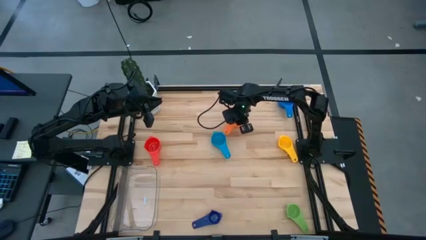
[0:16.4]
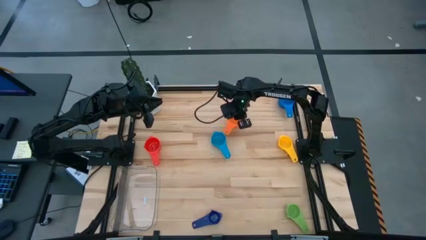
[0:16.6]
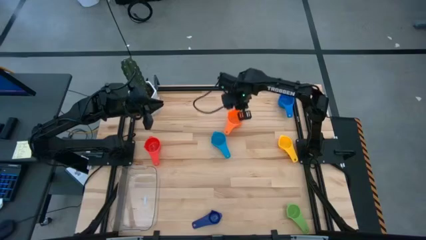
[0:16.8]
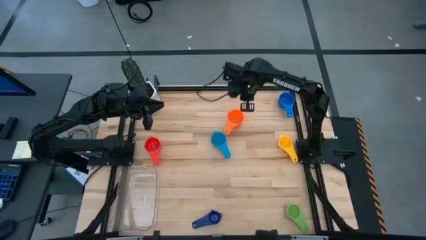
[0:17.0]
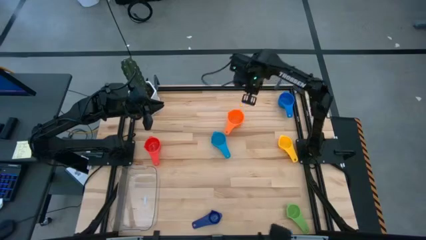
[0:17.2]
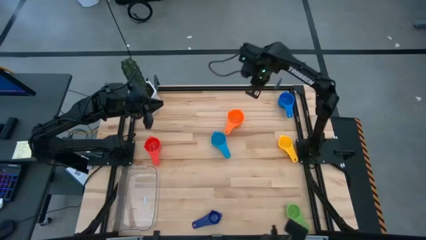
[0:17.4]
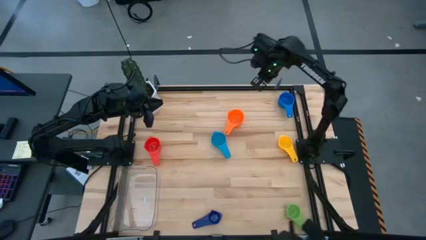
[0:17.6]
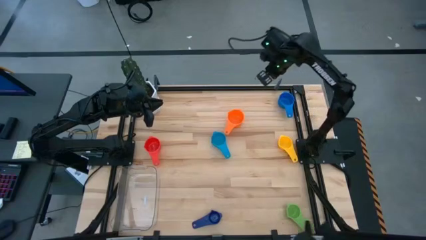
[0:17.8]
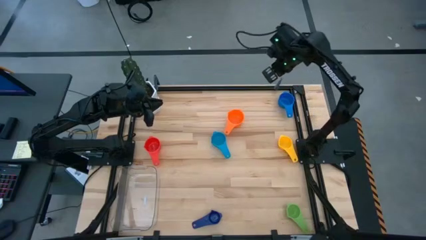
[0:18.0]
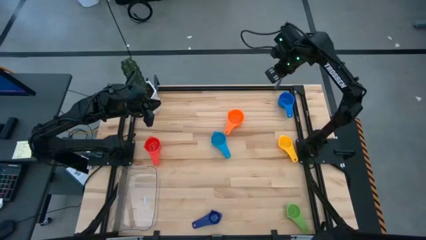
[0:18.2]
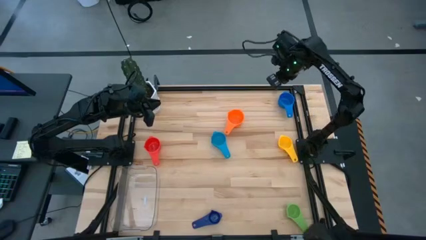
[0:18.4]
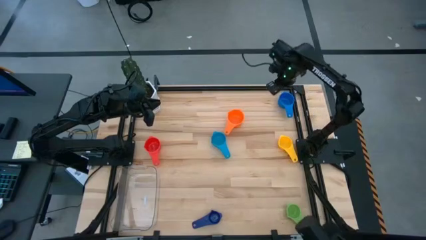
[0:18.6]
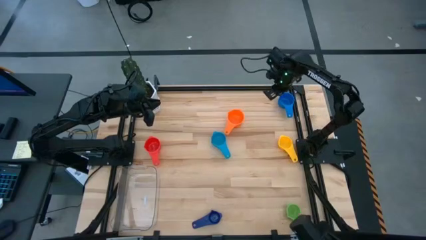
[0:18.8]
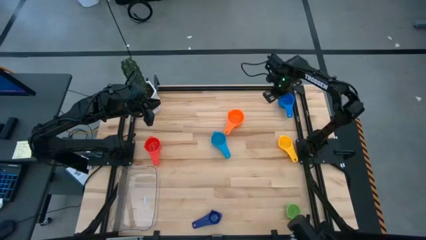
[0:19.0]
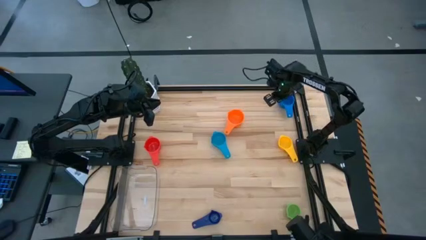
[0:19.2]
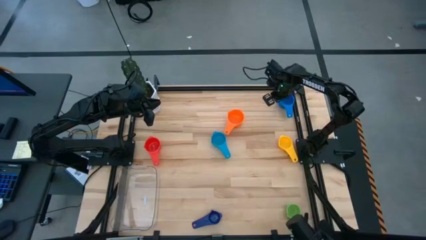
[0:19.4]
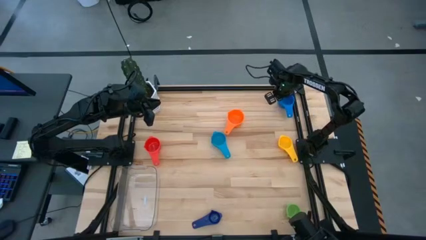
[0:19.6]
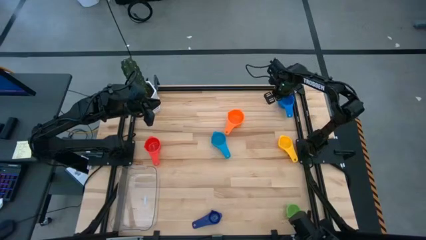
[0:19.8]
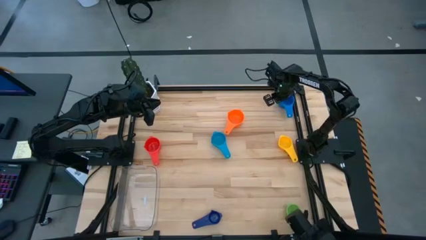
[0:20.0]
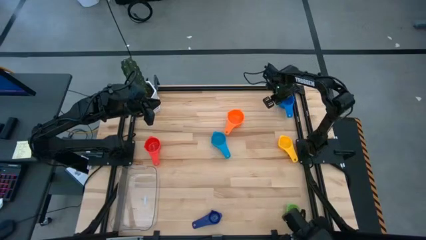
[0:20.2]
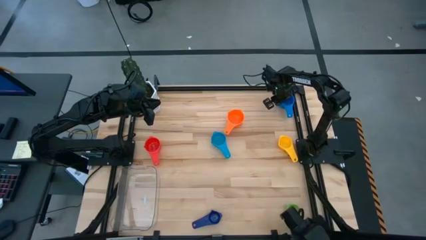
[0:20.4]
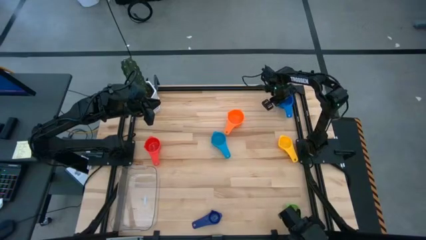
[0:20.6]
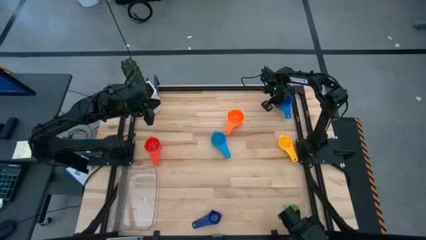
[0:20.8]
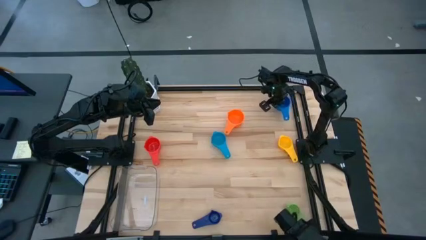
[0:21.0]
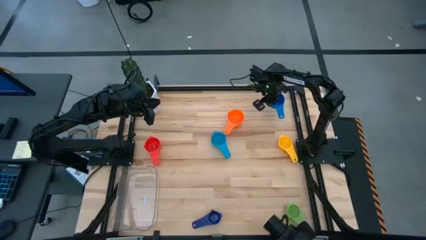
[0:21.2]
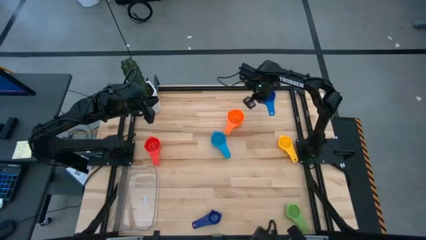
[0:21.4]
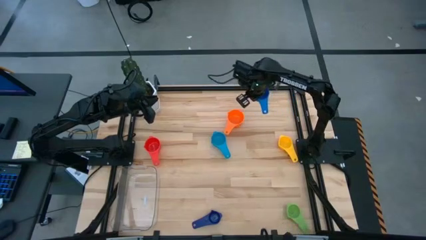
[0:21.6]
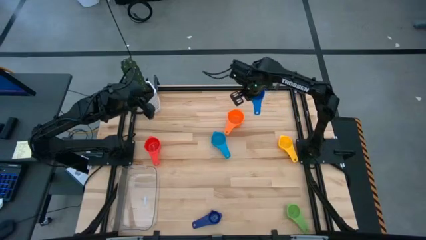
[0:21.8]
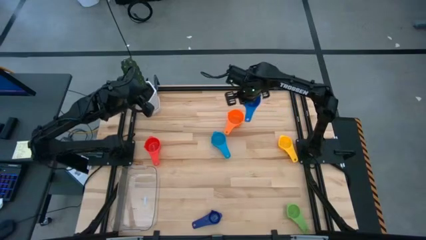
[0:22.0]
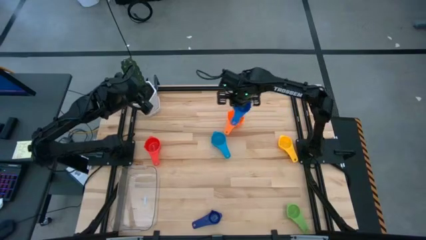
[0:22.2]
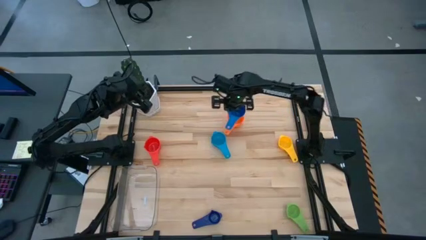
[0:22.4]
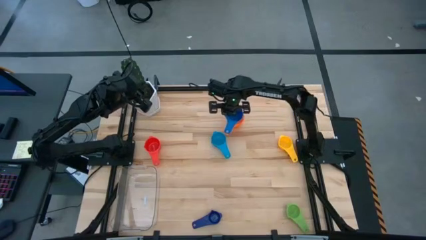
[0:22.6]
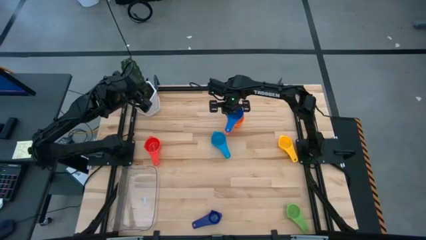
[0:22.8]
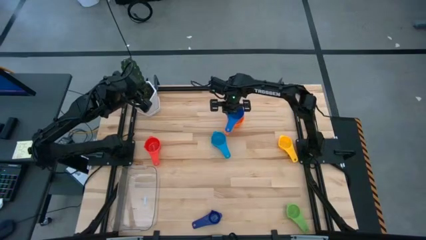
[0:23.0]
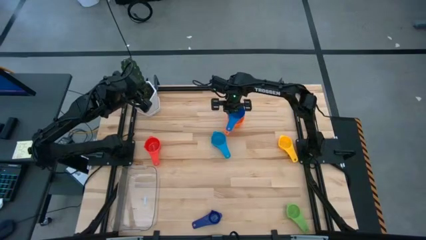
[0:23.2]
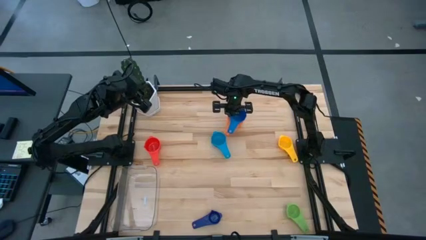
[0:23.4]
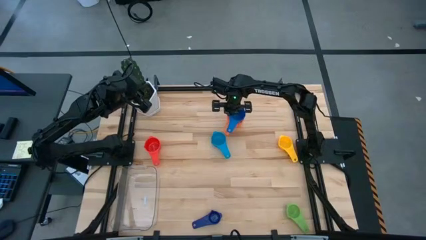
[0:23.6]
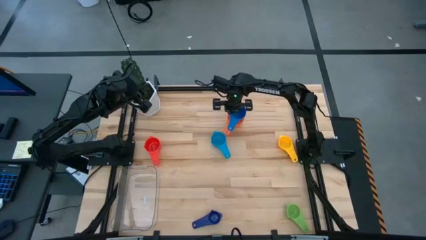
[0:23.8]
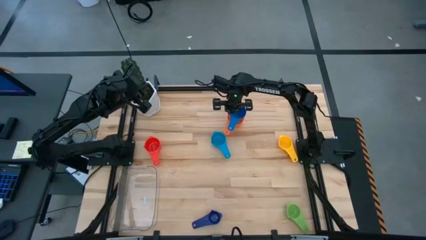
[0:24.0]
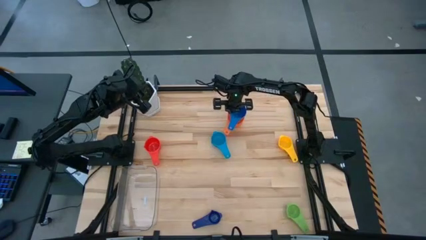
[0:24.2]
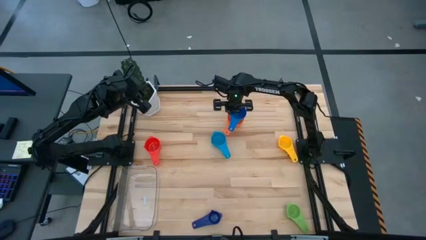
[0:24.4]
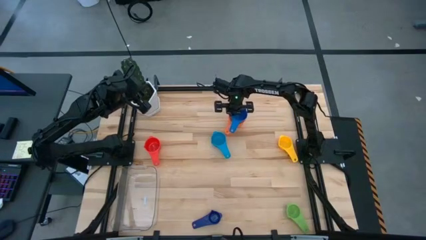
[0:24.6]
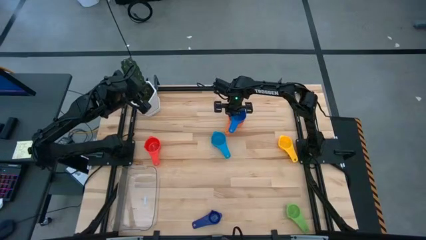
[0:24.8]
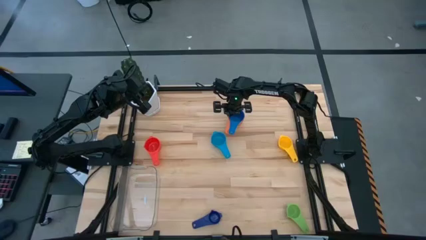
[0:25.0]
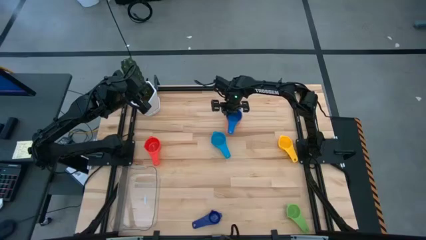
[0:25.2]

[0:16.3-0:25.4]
Task: Nest measuring cups in basket
Stack the blue measuring cup on top of the orange measuring cup

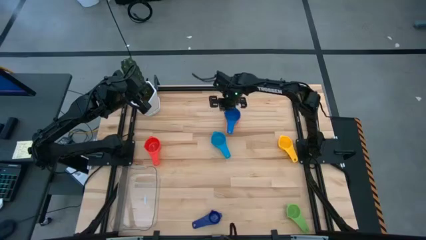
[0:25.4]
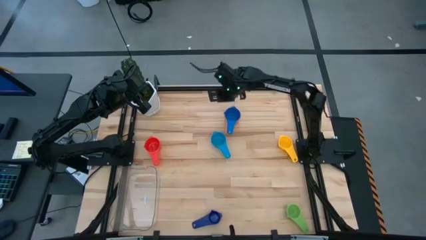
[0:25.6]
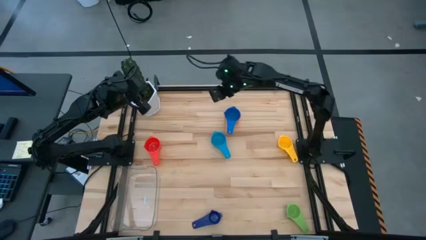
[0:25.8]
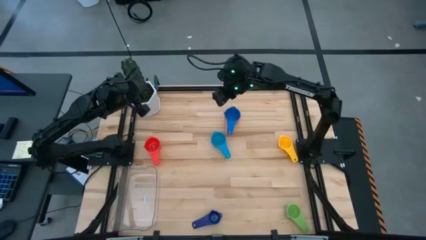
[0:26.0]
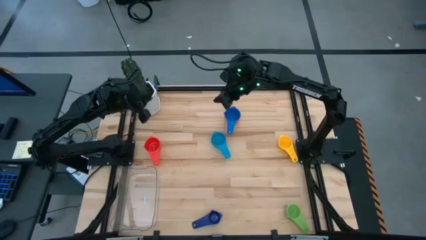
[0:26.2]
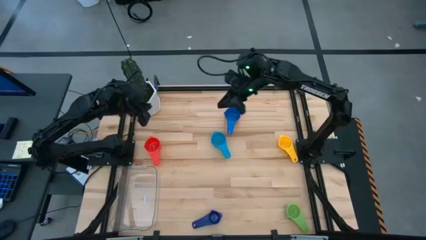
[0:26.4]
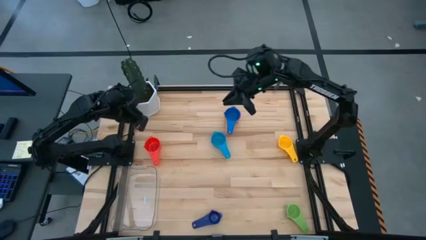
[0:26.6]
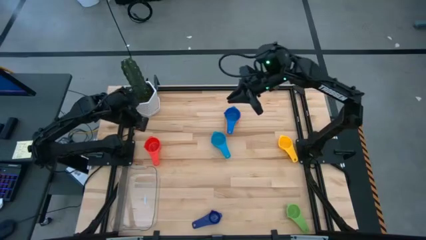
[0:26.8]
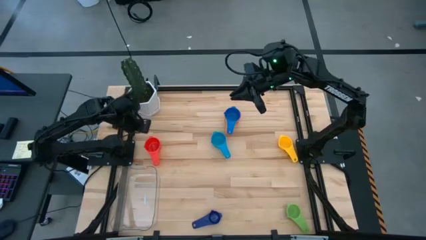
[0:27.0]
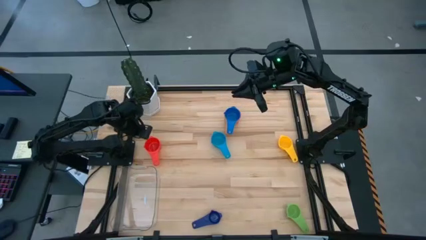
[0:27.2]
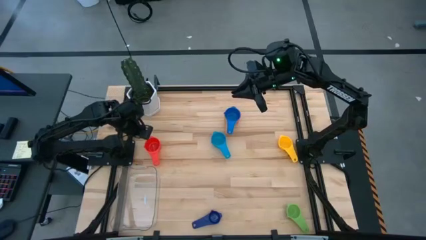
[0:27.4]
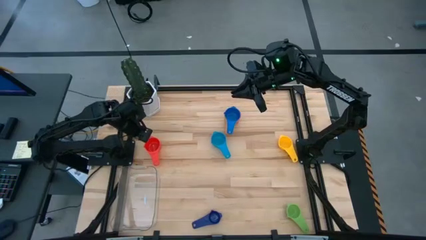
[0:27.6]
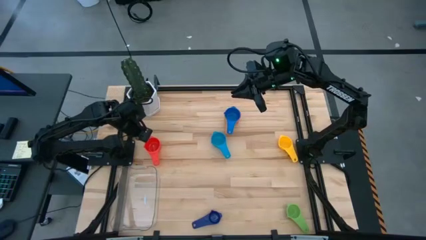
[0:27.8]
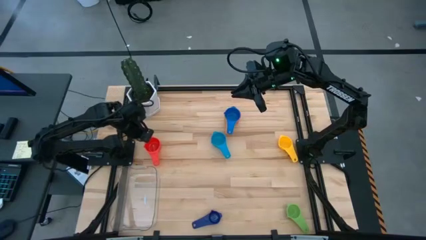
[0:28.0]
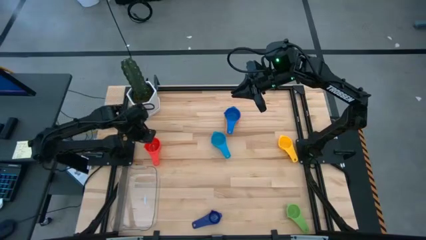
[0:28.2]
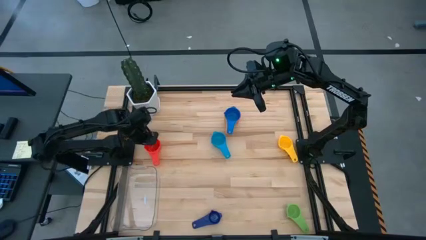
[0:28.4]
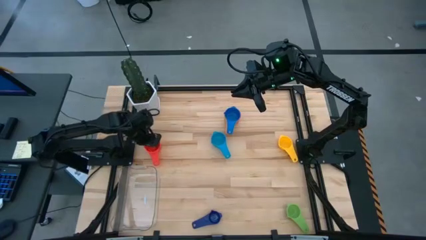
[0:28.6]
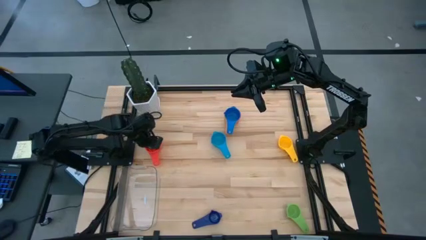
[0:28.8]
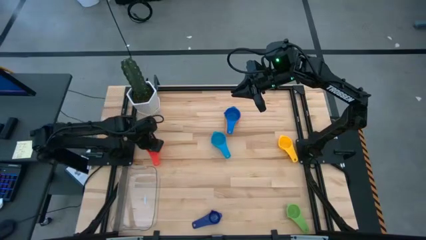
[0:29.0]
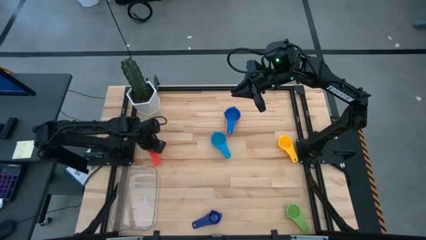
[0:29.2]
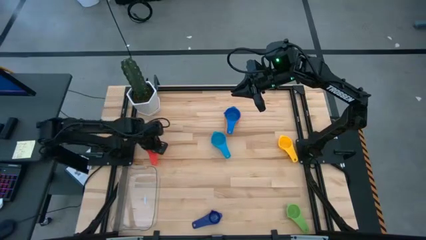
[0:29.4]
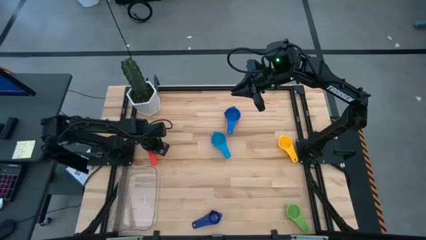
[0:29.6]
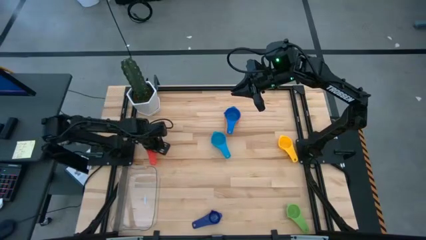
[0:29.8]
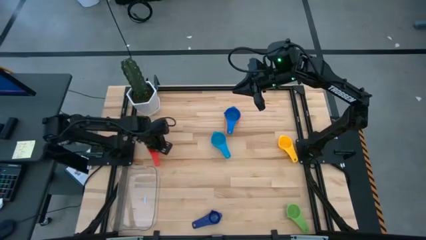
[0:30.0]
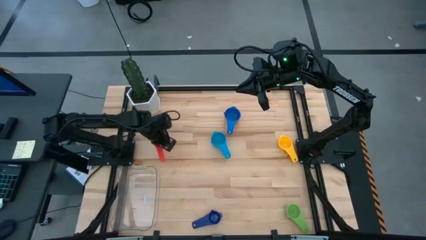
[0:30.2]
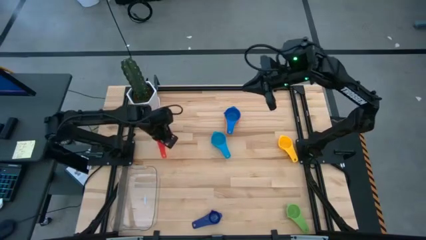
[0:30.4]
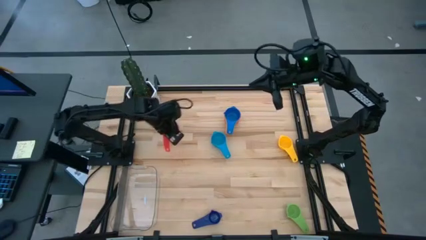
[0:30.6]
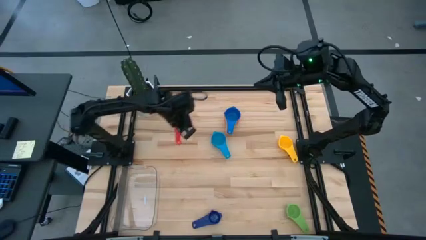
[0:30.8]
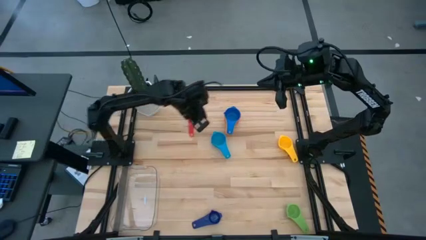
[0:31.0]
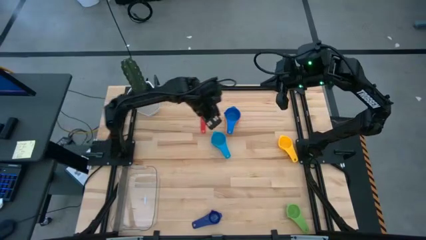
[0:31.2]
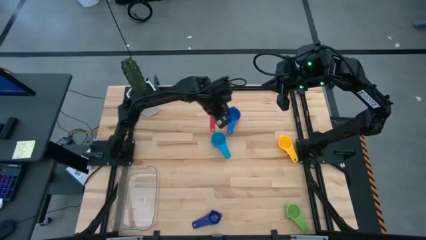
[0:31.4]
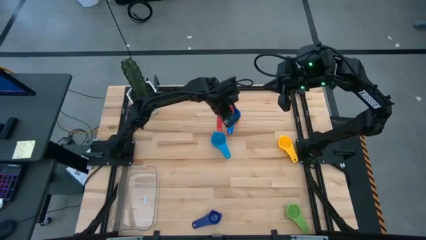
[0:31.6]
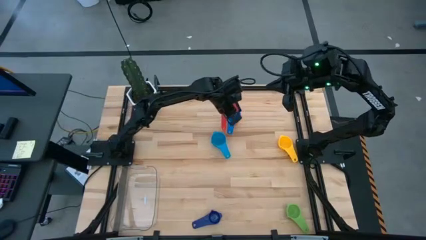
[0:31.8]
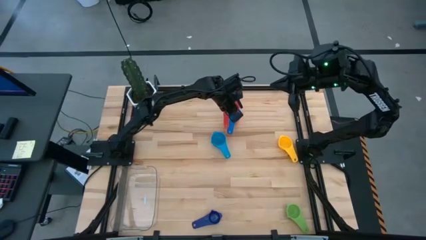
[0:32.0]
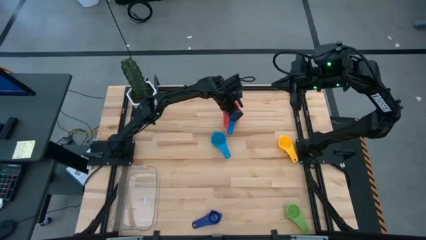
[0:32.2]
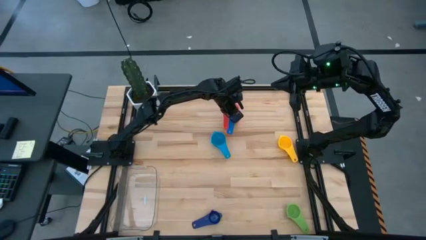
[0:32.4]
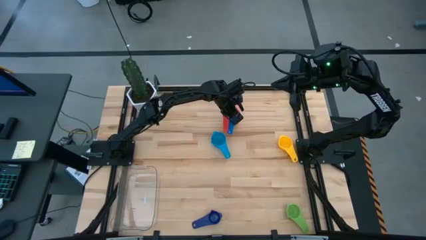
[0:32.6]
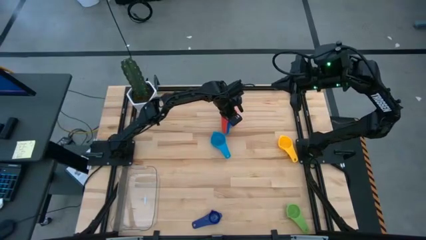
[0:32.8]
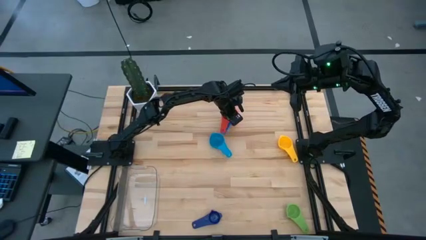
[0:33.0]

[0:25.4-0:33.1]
Stack the red measuring cup on top of the blue measuring cup
